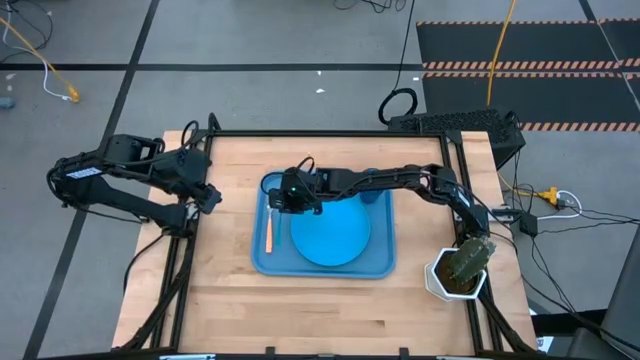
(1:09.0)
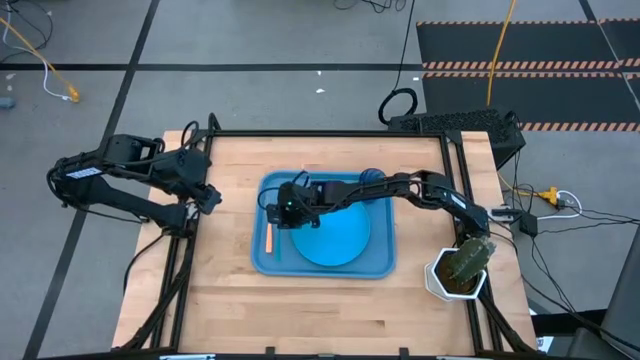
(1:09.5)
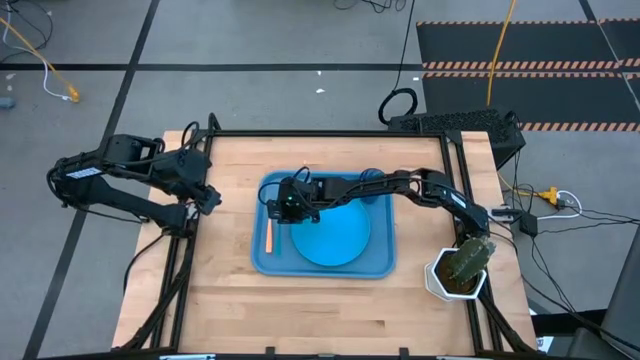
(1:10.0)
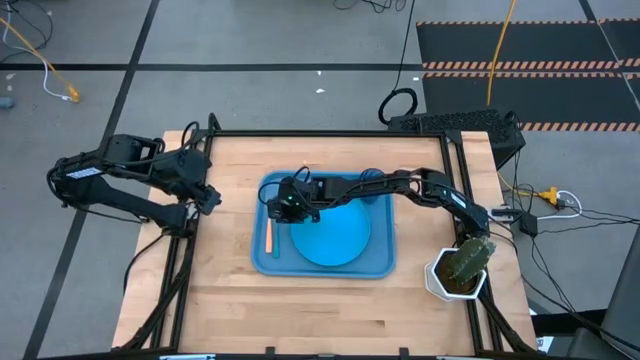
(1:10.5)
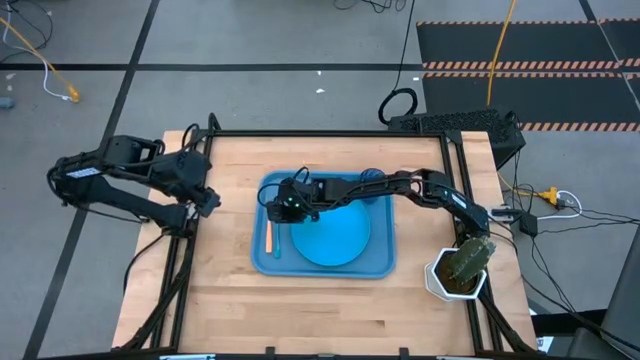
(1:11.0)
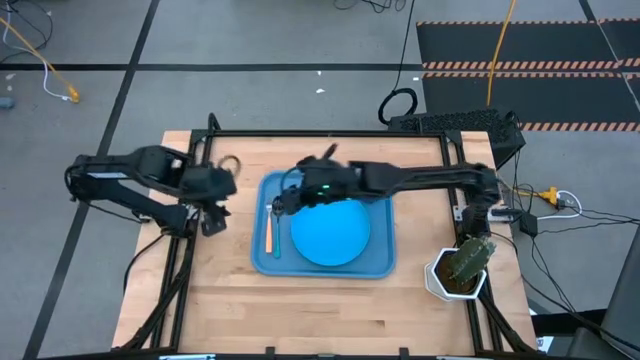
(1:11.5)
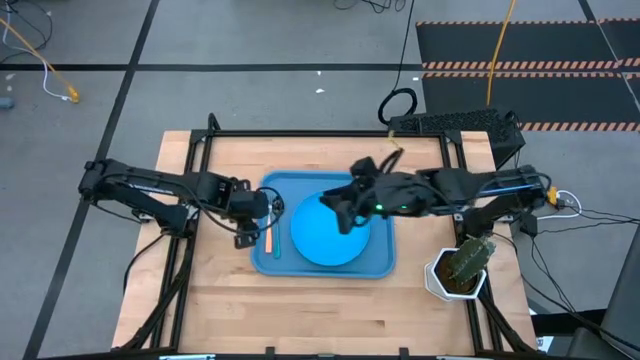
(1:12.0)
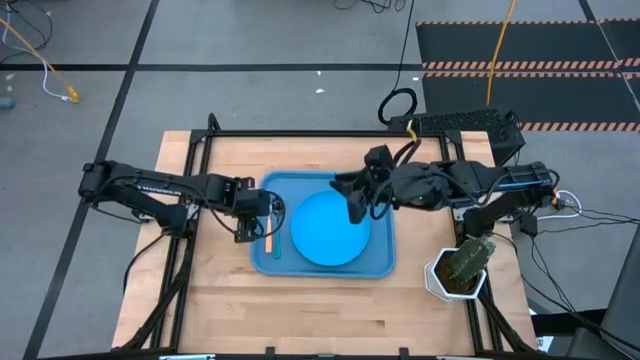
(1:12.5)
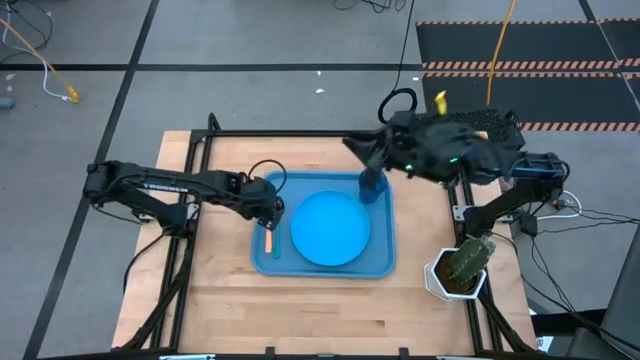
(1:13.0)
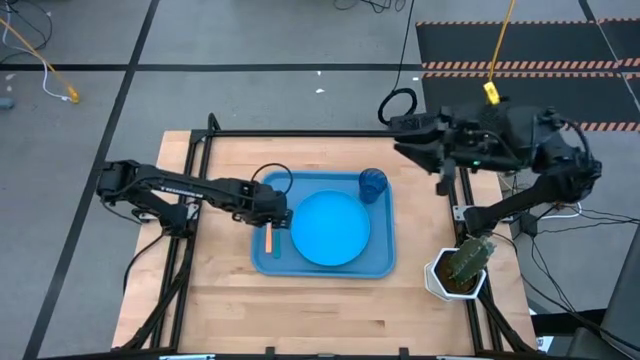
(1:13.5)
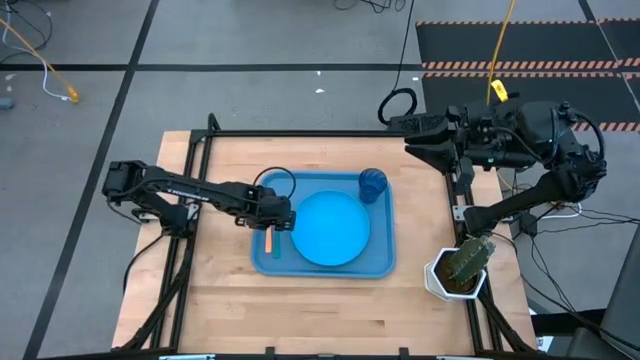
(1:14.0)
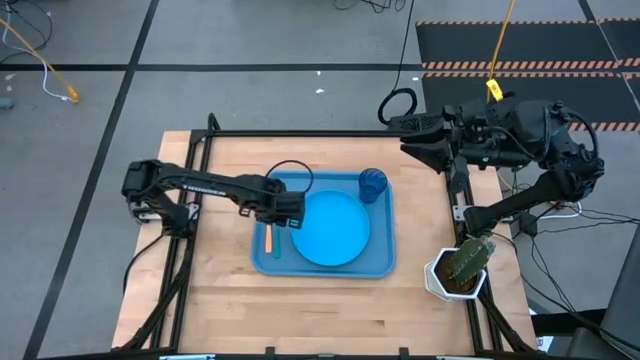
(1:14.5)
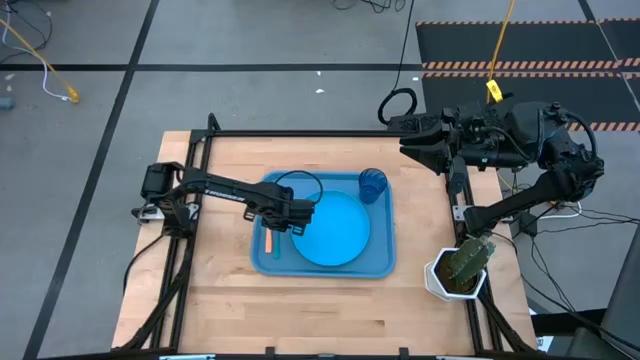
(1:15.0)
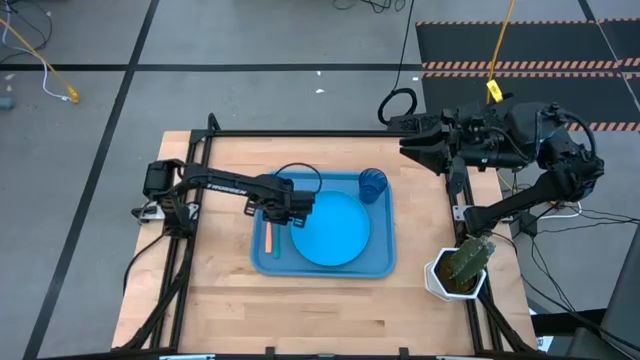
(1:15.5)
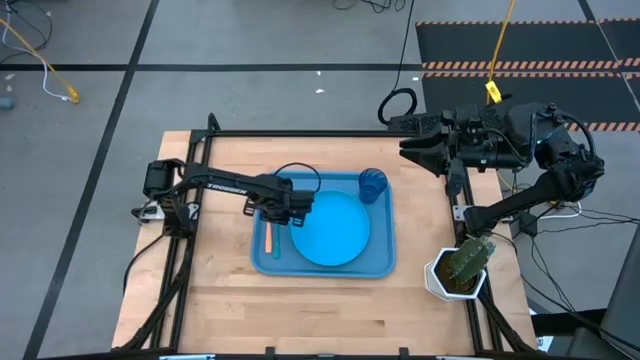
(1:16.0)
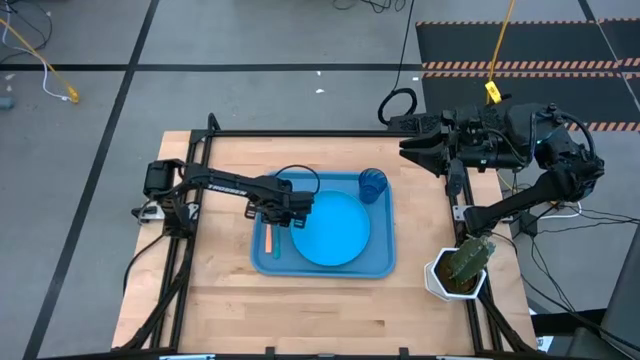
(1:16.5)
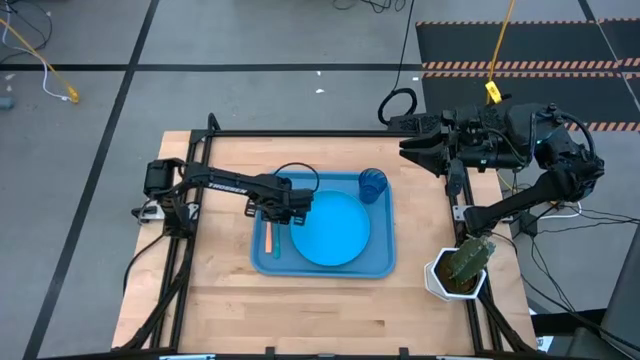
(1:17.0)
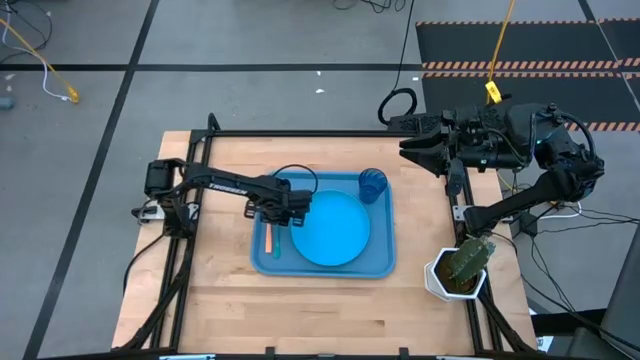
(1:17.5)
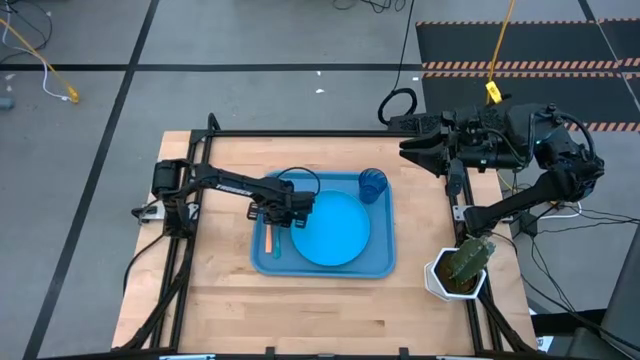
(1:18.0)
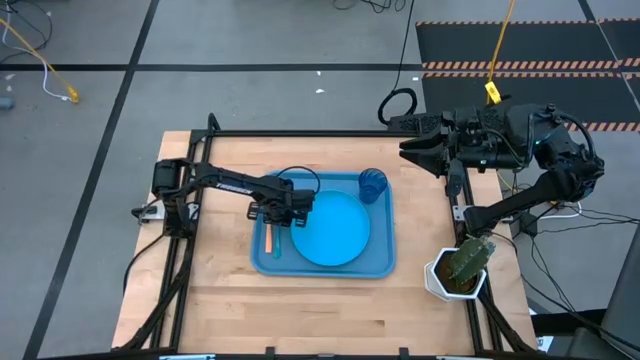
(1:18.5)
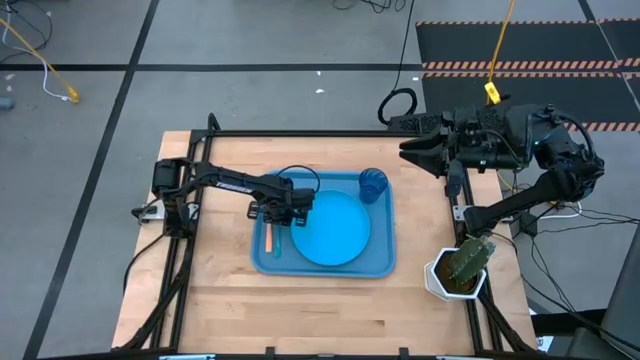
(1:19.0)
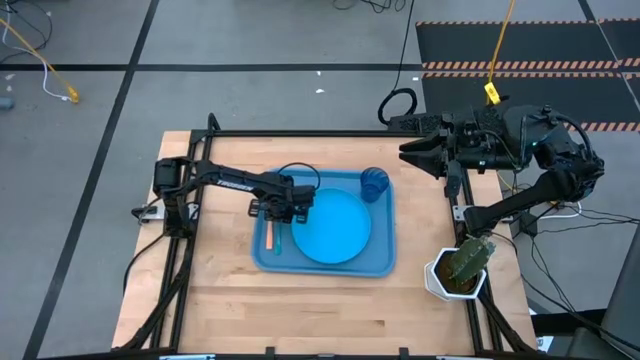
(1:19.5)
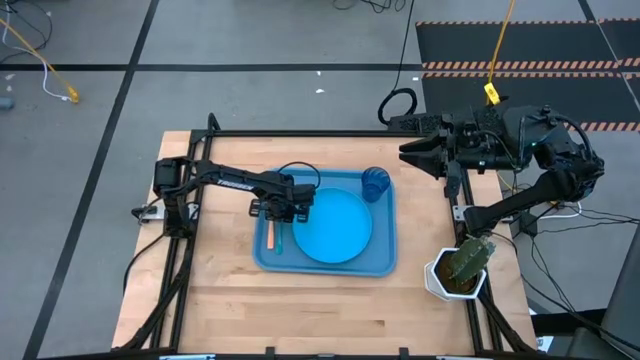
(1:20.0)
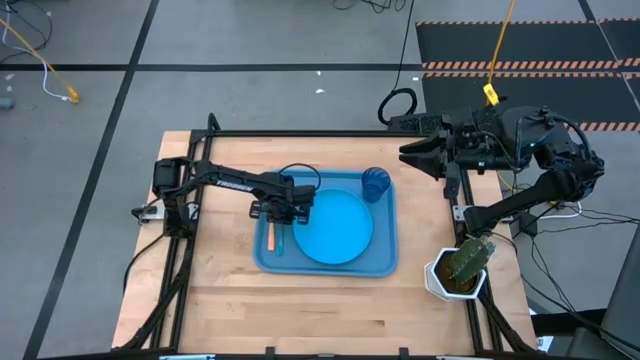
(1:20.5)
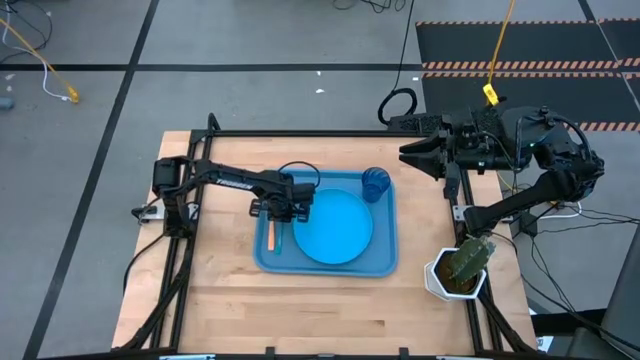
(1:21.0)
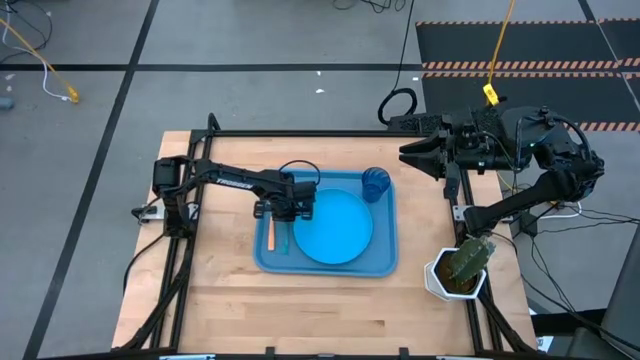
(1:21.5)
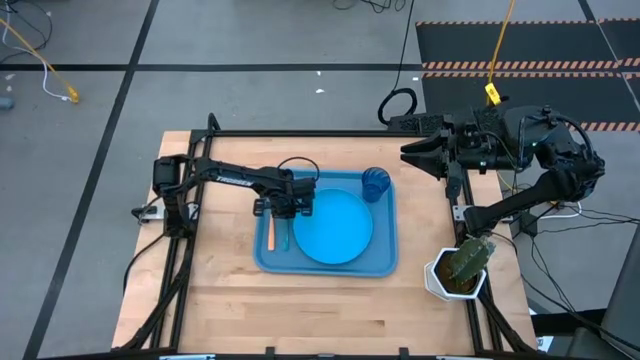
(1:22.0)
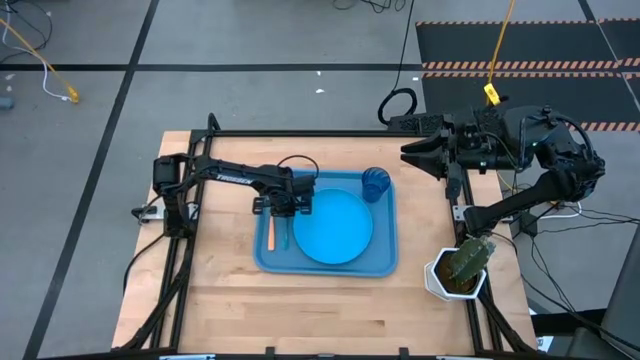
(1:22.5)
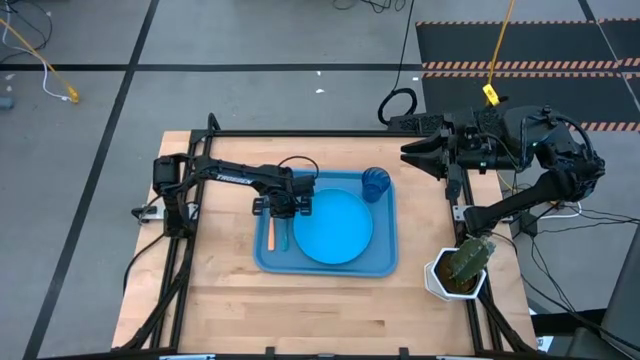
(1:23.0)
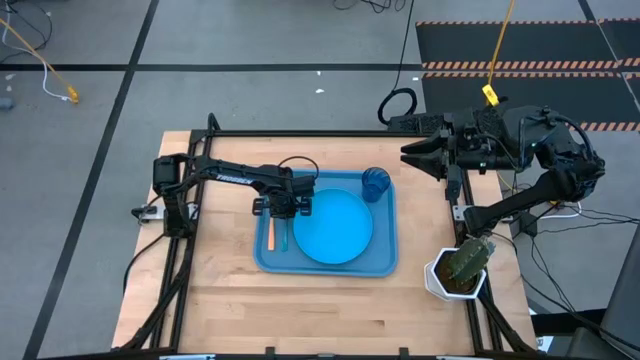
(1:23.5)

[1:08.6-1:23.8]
Task: Pick and place plate/cup/fork/spoon on tray
Put the blue spoon on the blue tray to the left of the blue plate

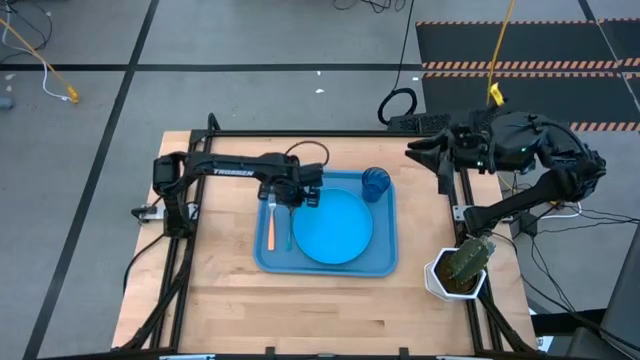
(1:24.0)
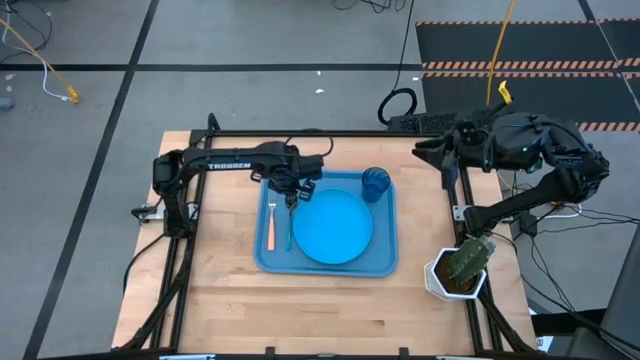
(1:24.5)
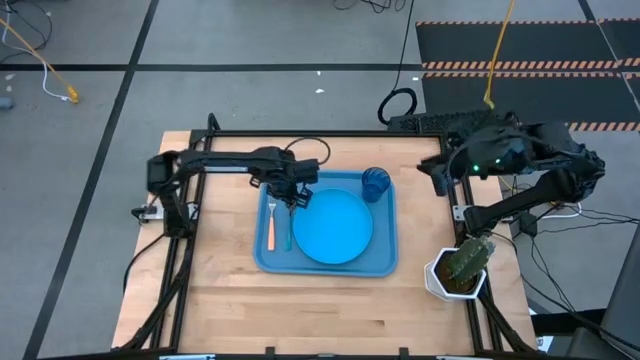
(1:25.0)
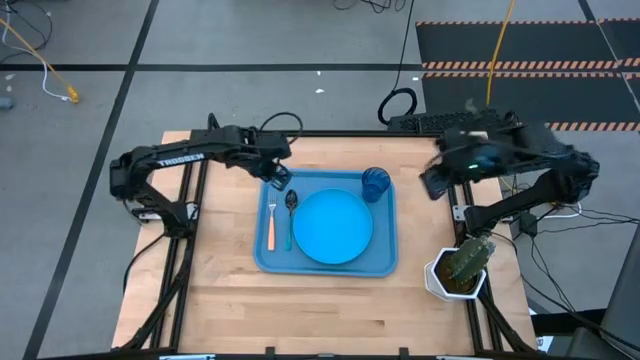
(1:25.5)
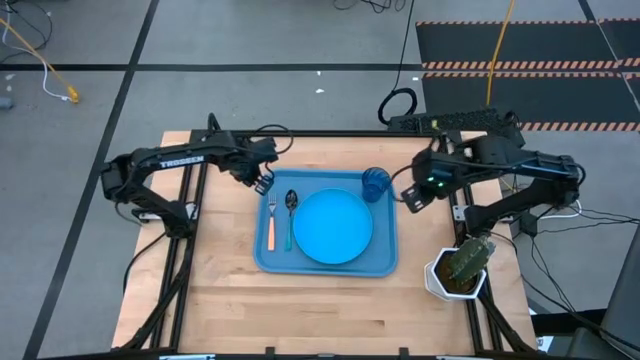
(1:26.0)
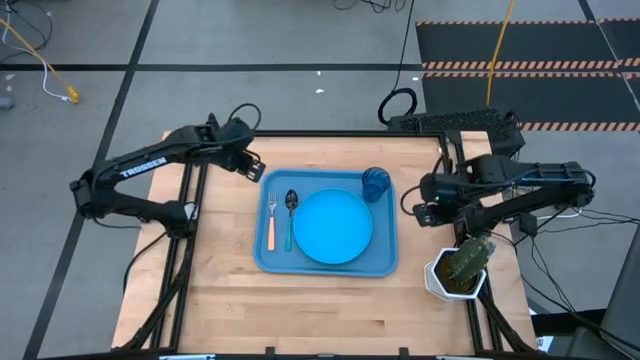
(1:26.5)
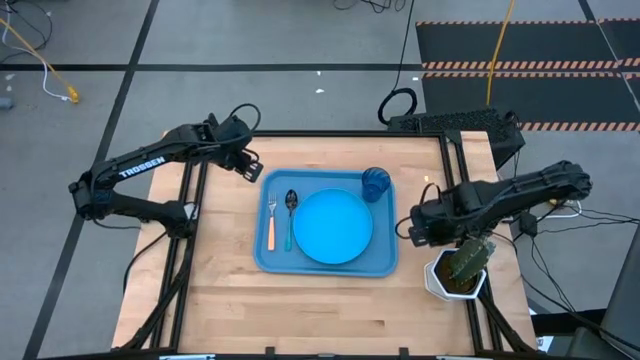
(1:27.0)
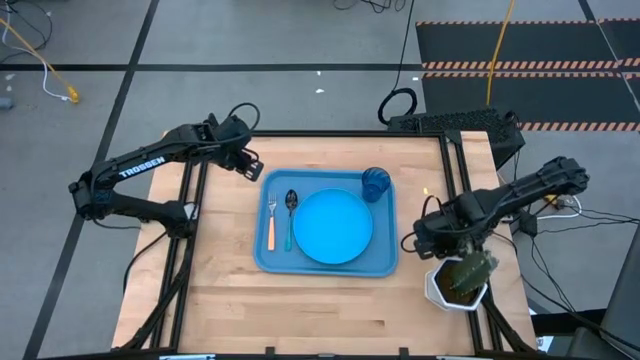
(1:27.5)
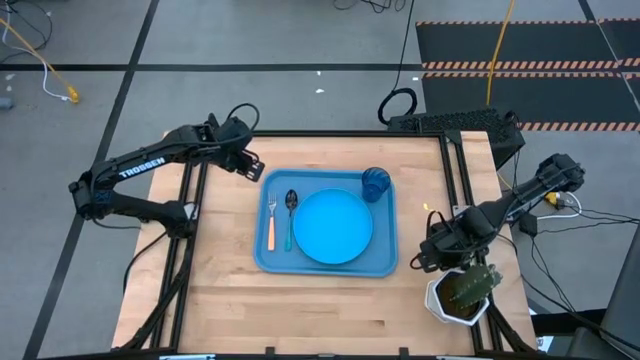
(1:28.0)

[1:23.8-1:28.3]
Adjust the white potted plant on the table

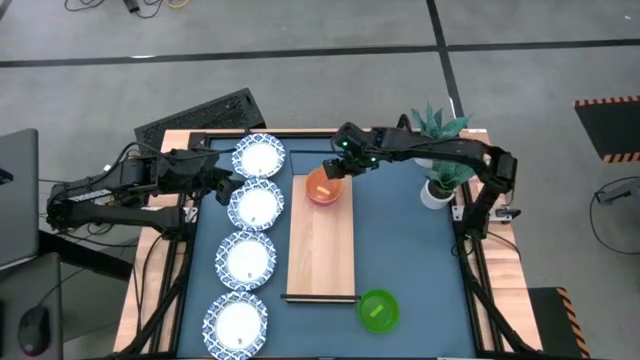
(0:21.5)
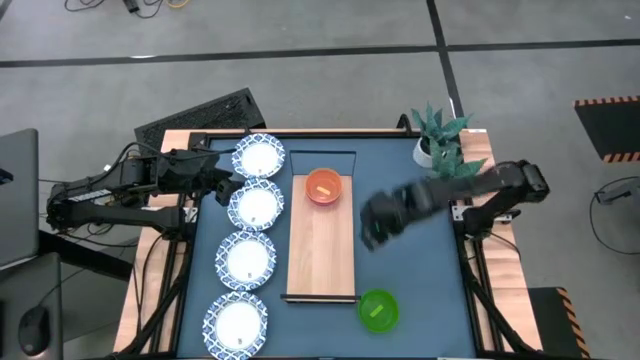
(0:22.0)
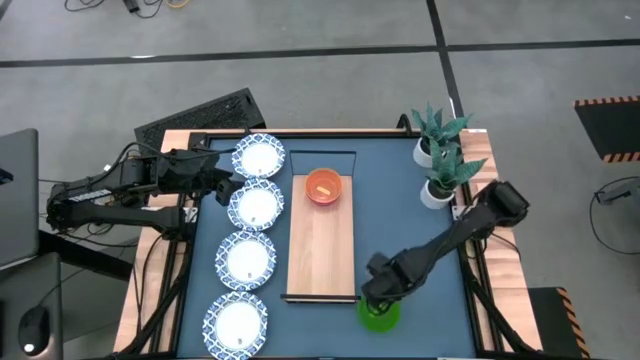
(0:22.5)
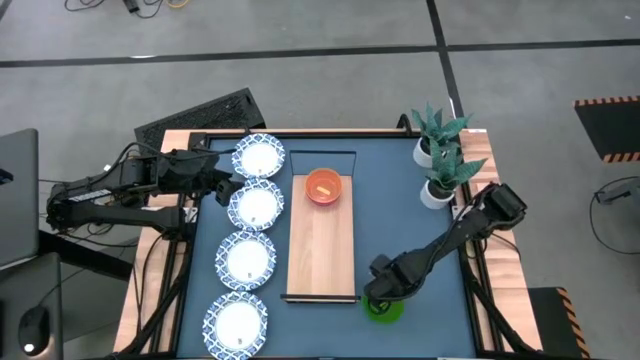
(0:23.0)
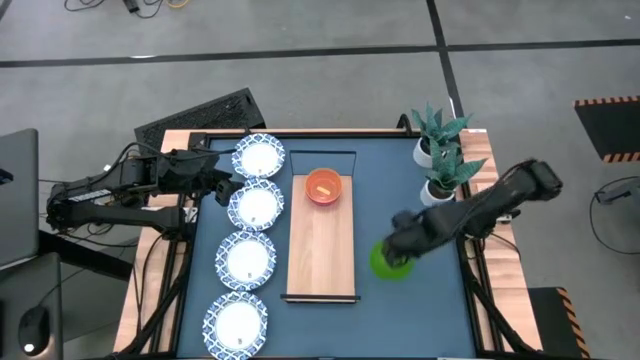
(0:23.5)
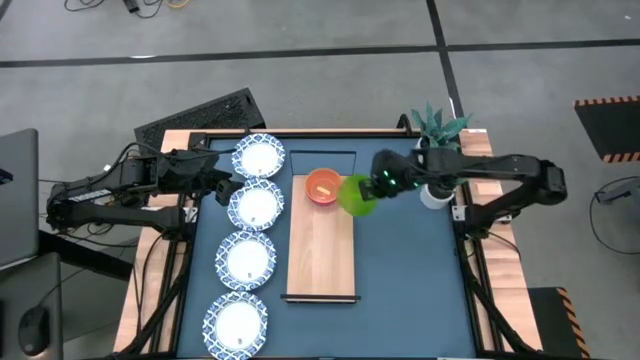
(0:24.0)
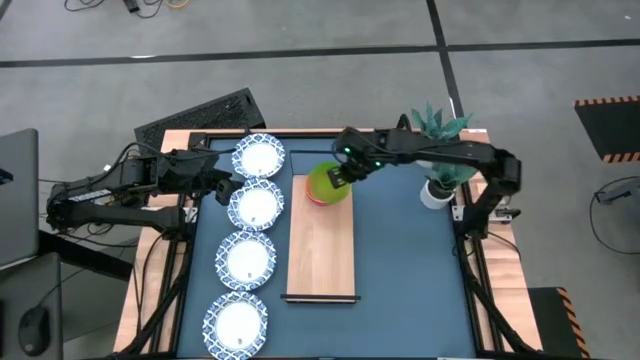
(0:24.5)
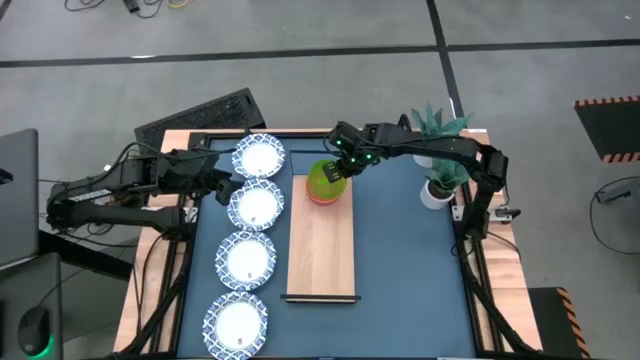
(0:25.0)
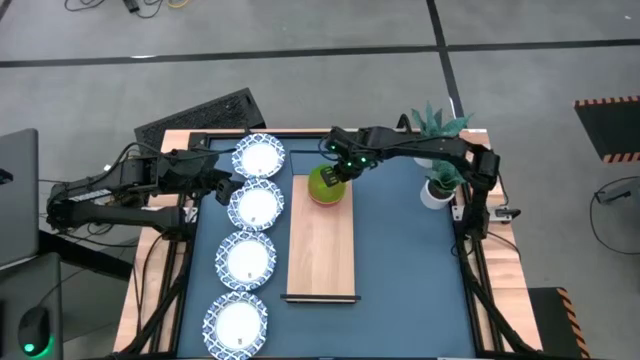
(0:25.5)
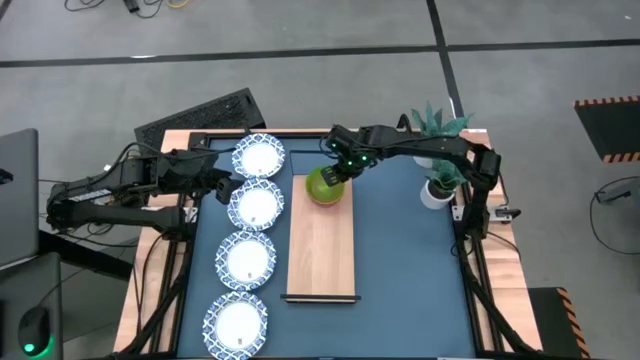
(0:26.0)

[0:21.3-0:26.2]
Task: Place and stack bowls onto a shelf
Stack the green bowl on top of the yellow bowl on the shelf
